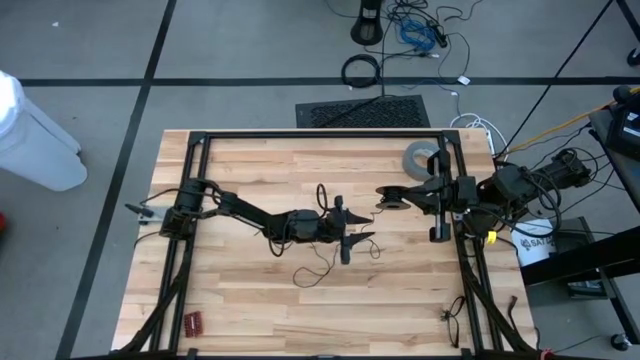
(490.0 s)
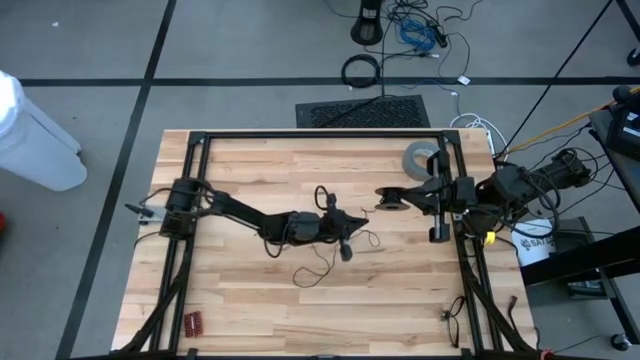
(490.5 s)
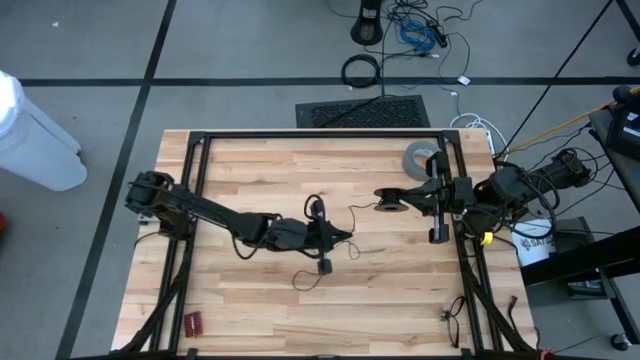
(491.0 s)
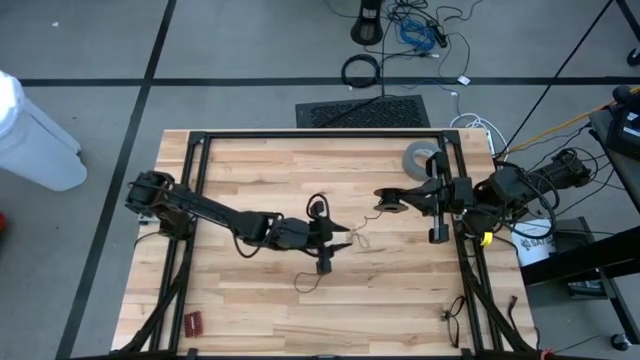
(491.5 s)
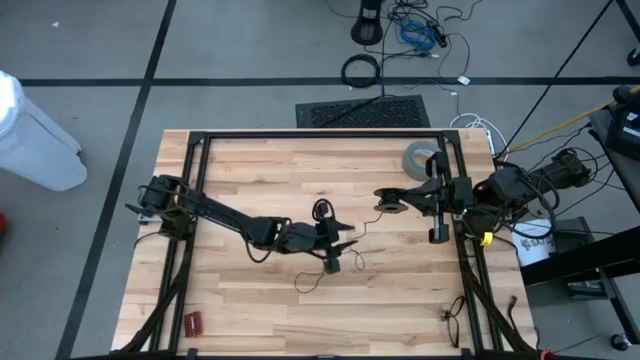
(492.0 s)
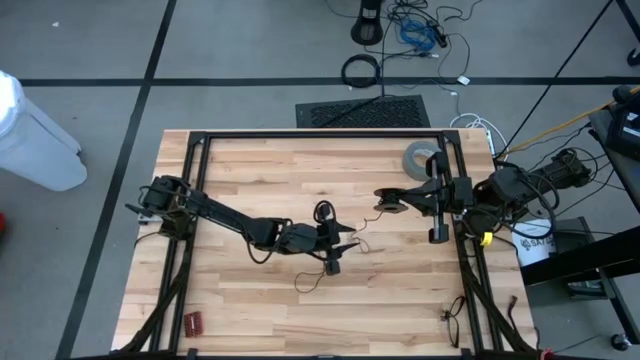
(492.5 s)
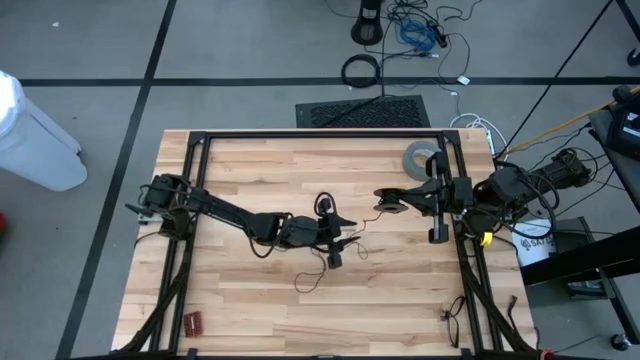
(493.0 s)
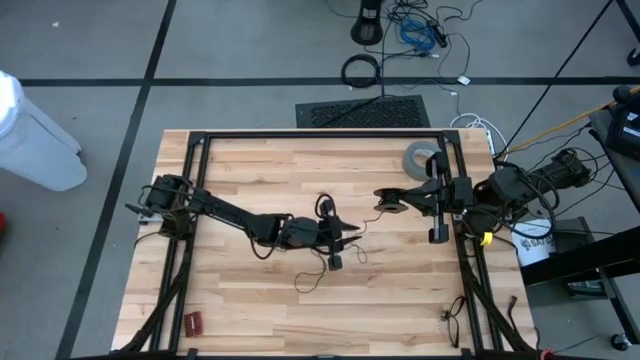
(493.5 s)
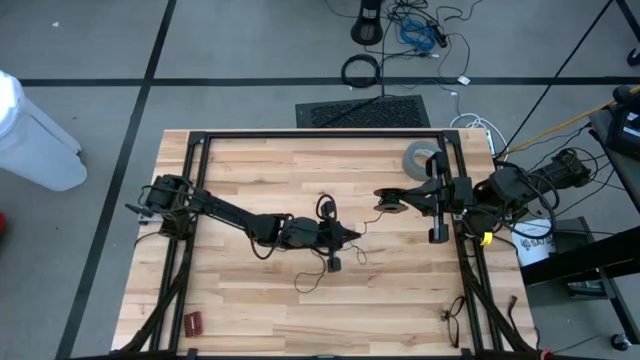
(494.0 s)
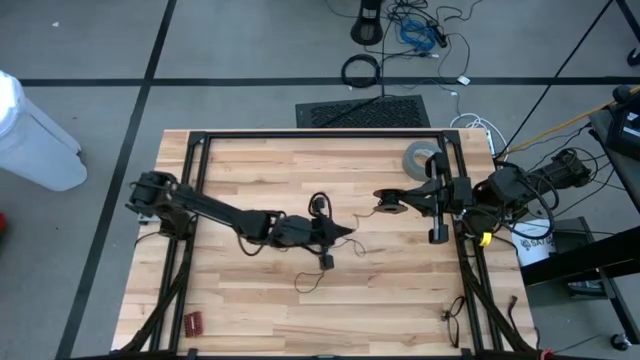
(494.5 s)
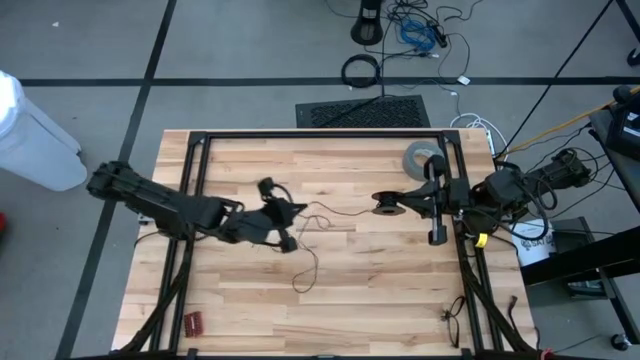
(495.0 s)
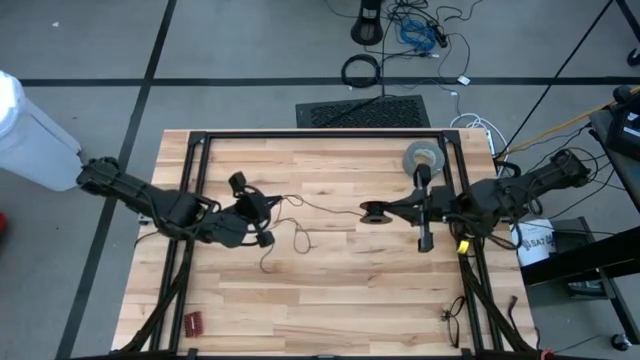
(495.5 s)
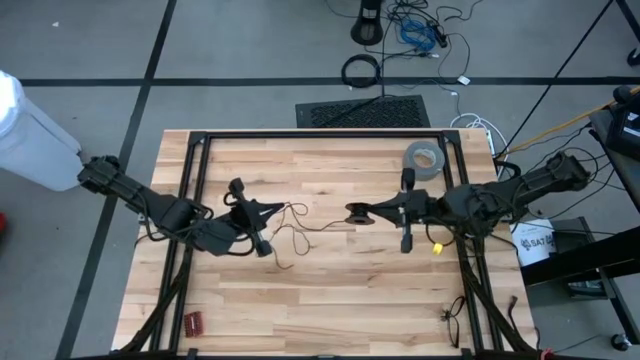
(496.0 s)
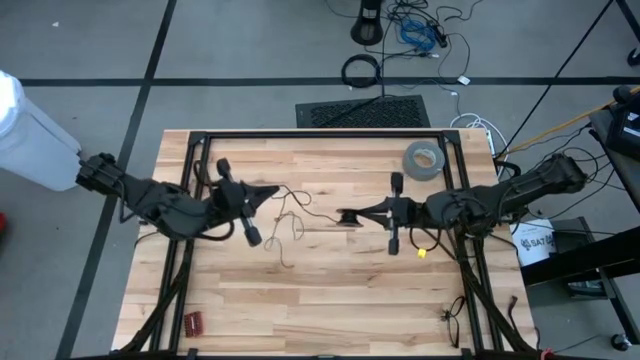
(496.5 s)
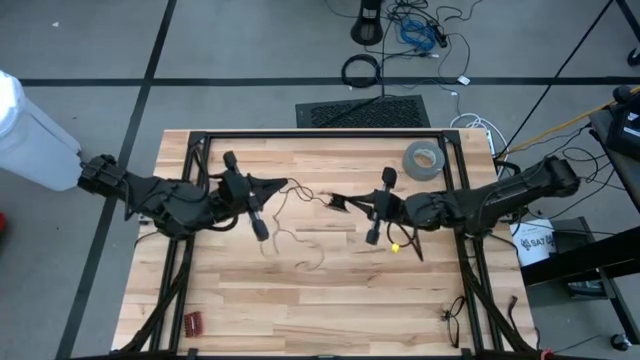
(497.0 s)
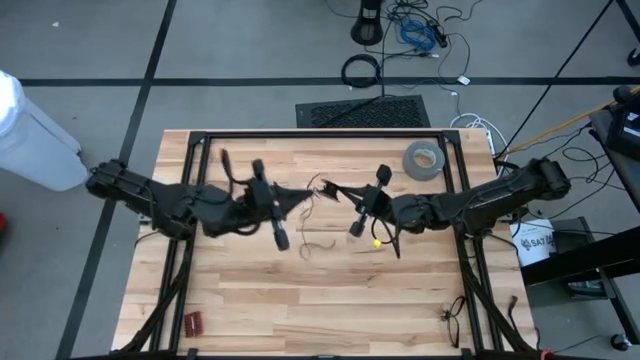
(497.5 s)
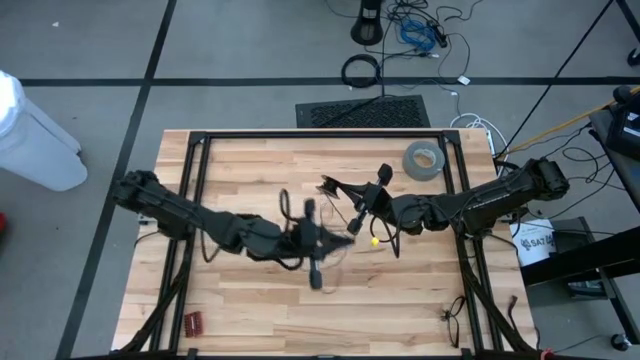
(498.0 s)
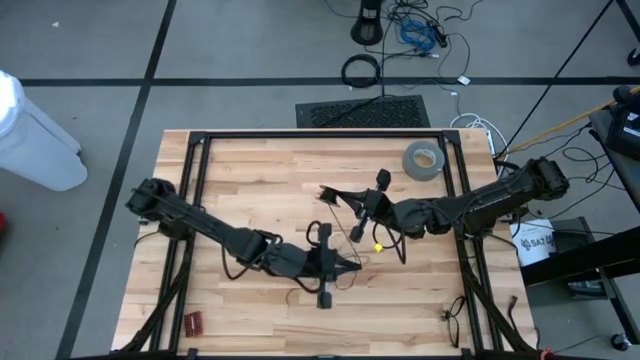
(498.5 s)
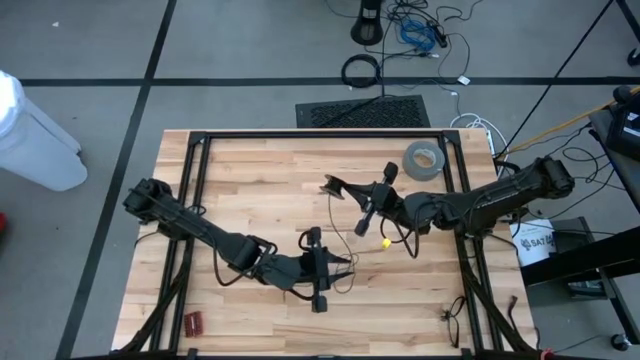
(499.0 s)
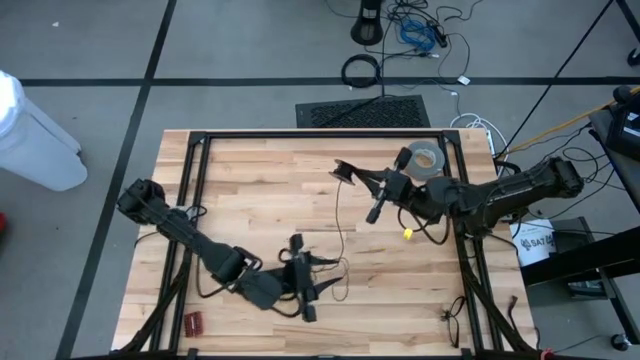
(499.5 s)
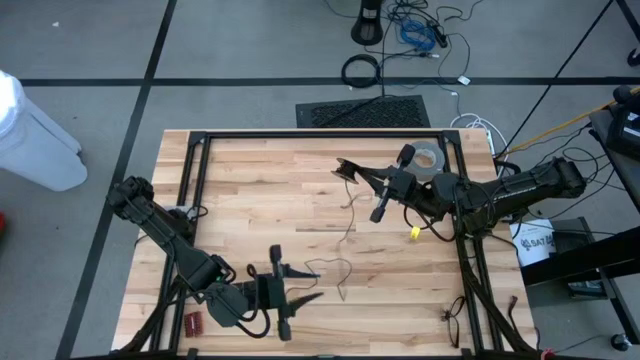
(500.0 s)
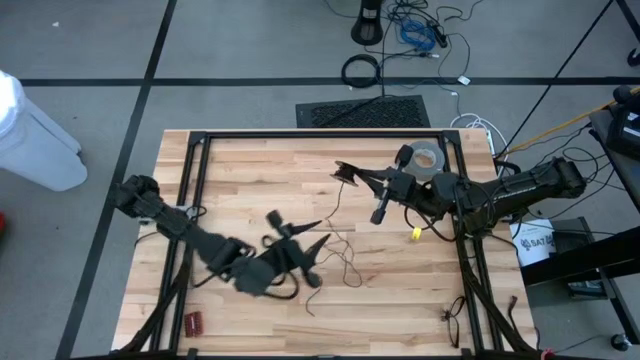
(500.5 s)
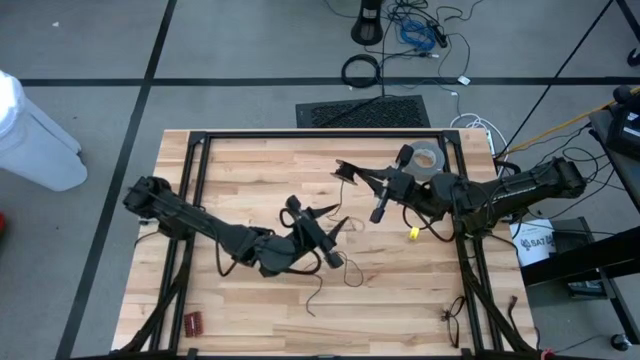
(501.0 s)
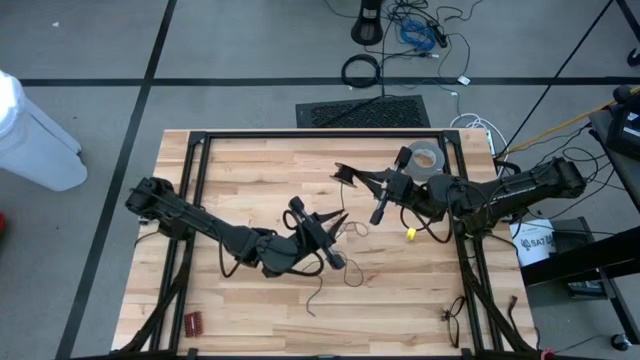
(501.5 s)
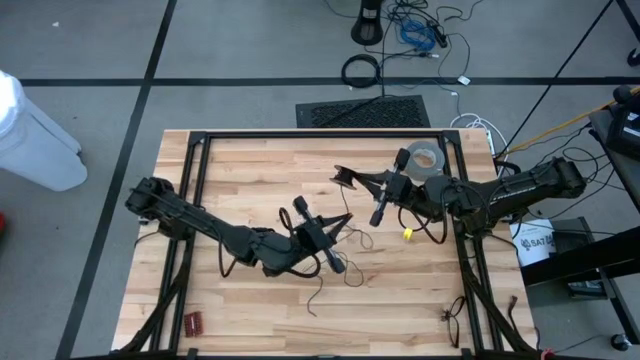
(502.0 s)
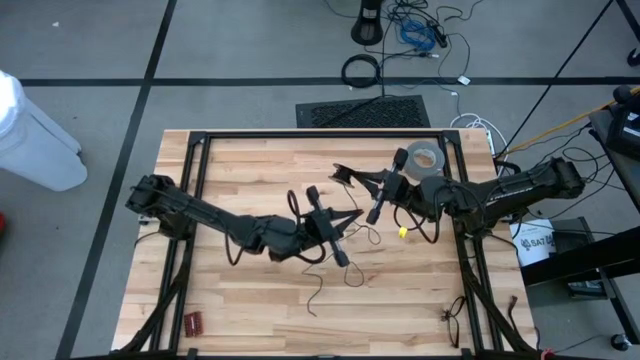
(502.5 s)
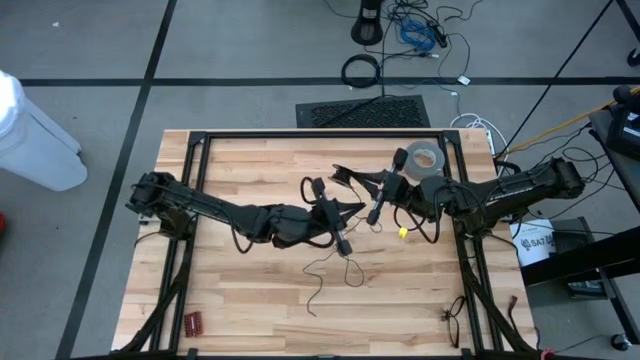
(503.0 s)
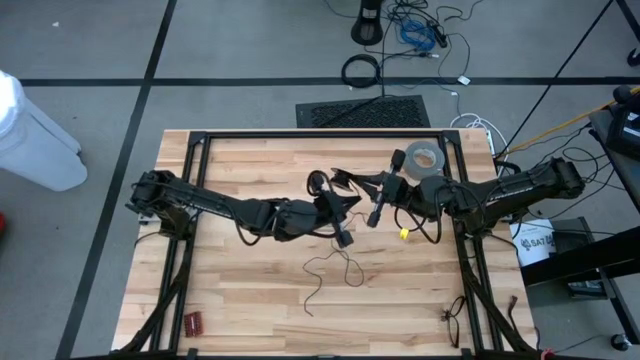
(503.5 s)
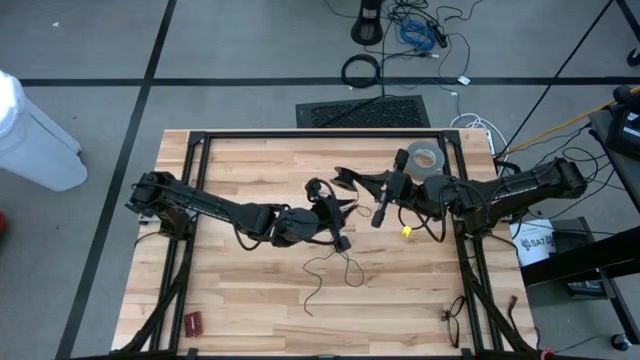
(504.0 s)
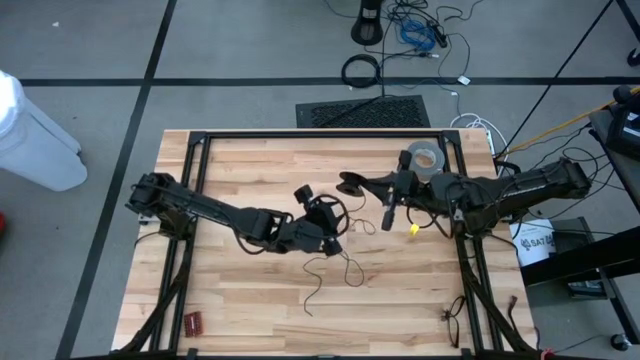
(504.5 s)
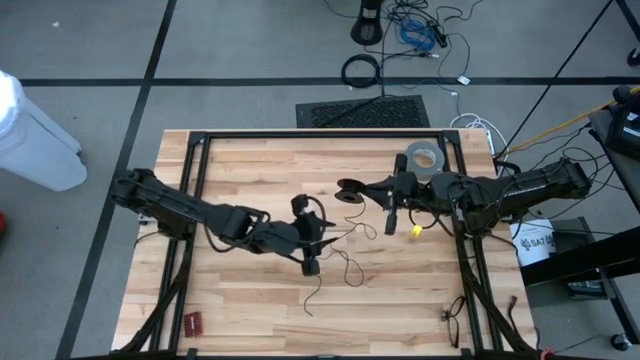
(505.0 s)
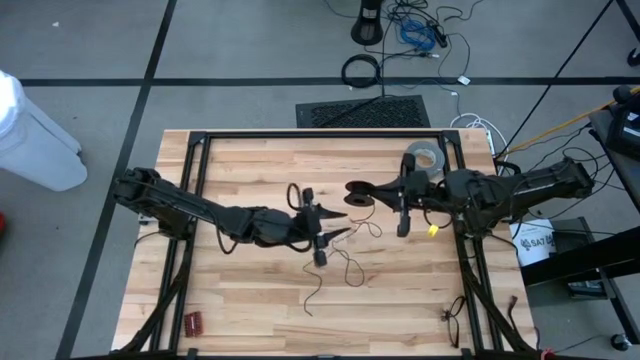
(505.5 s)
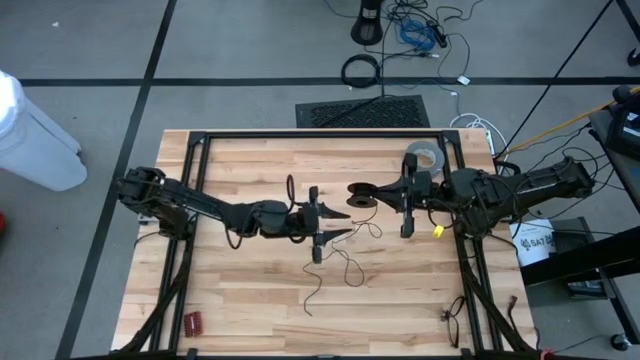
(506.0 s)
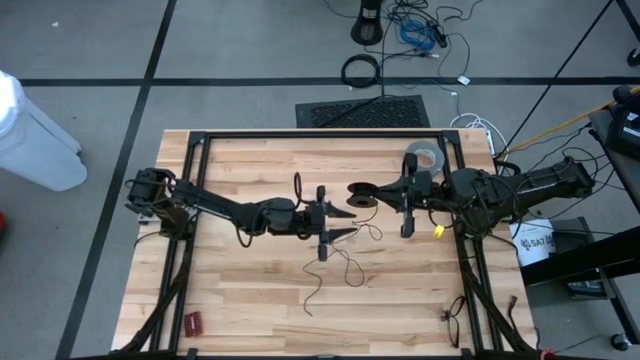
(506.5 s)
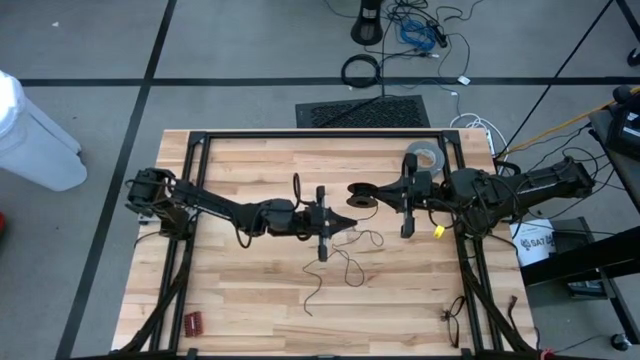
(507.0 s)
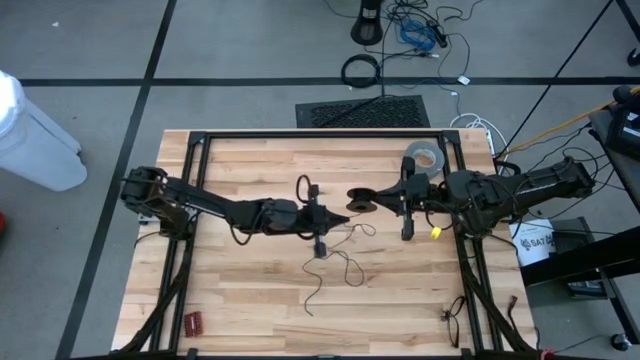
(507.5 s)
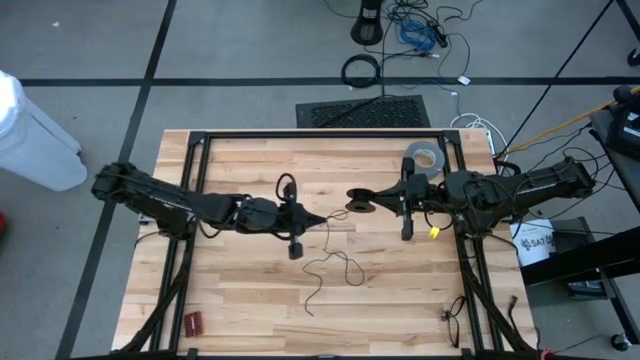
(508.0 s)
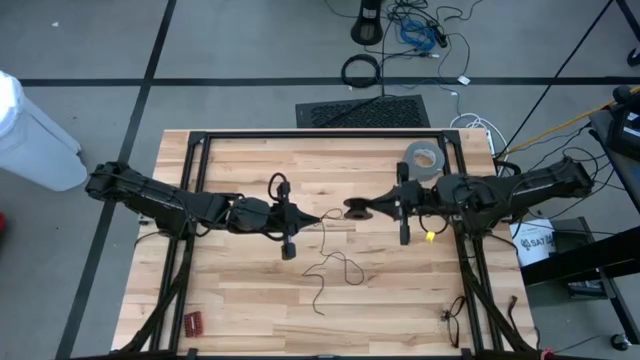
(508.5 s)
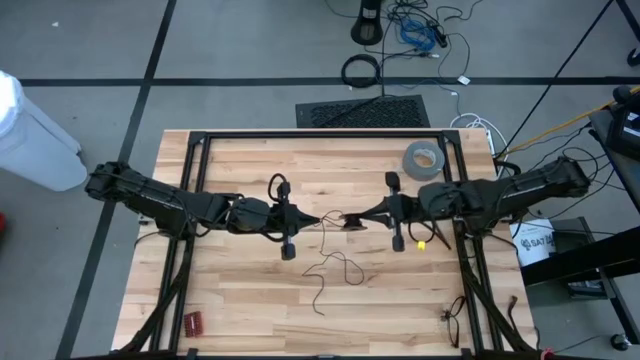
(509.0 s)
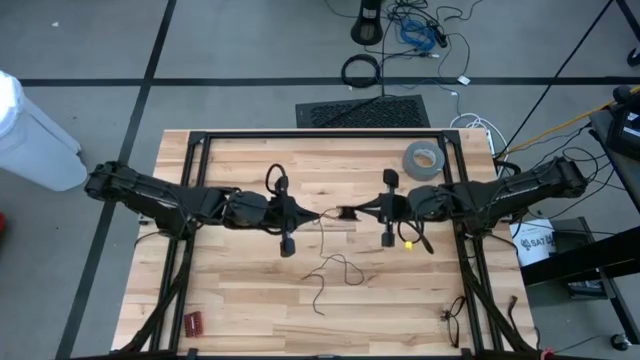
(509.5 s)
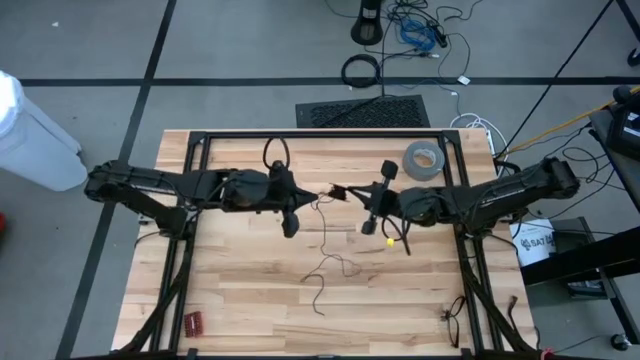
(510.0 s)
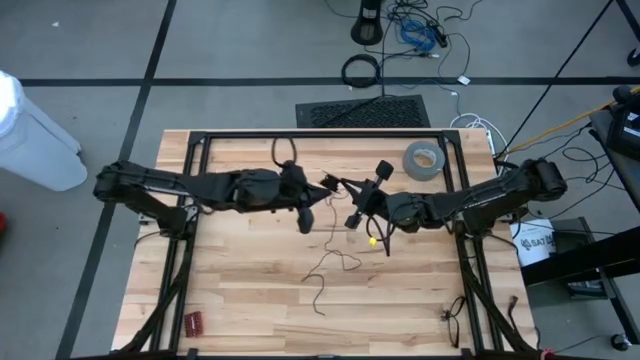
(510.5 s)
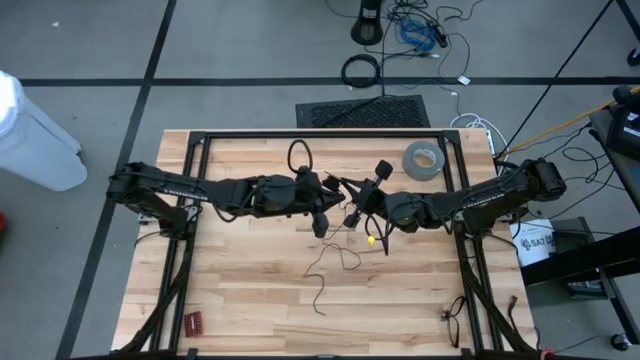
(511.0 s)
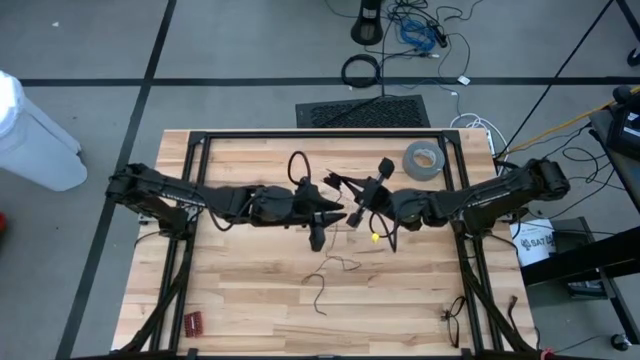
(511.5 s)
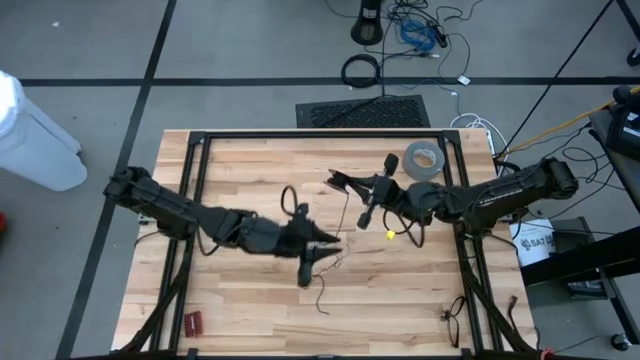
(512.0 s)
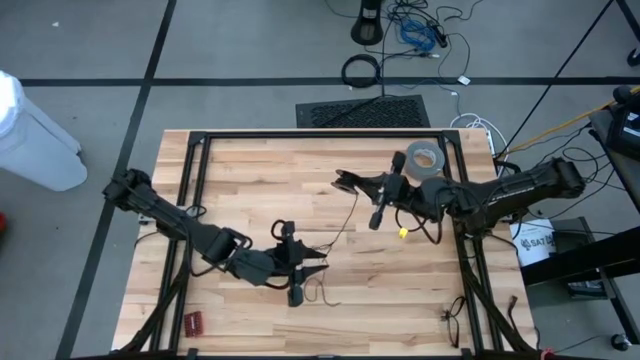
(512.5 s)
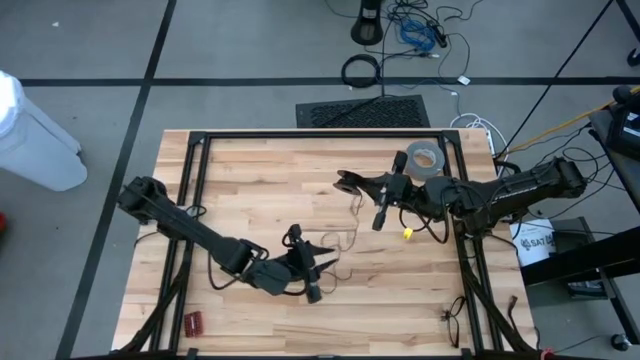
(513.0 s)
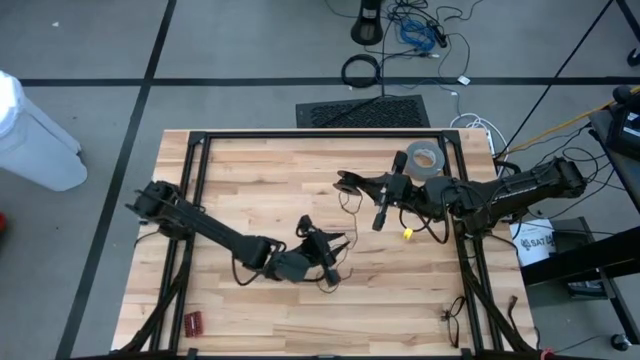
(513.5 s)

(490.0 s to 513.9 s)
Task: Coil cords
Coil the black wire onto the spool
